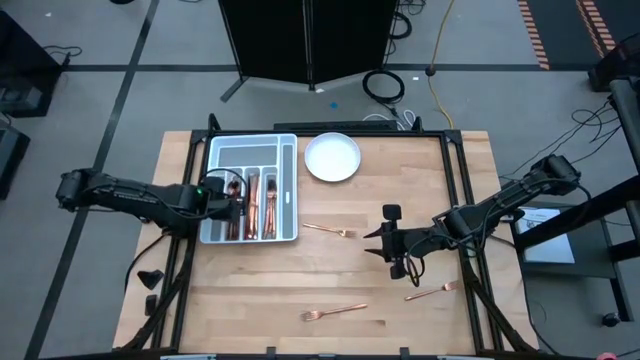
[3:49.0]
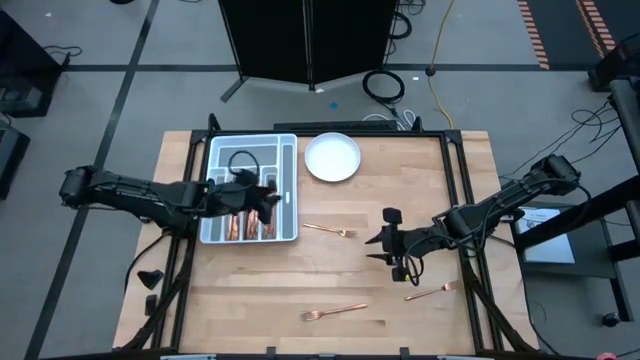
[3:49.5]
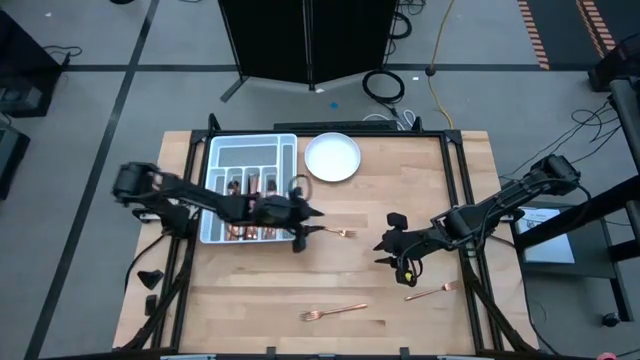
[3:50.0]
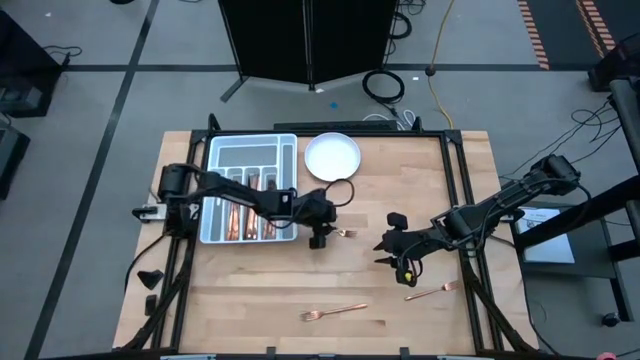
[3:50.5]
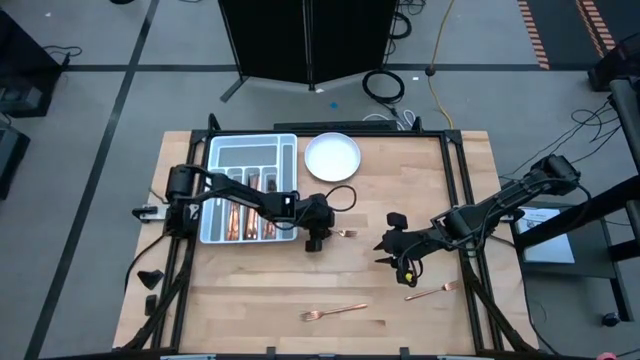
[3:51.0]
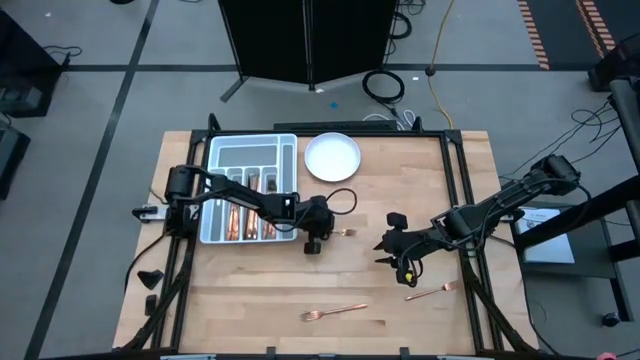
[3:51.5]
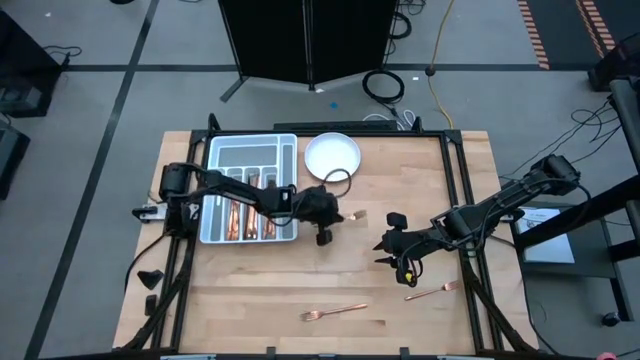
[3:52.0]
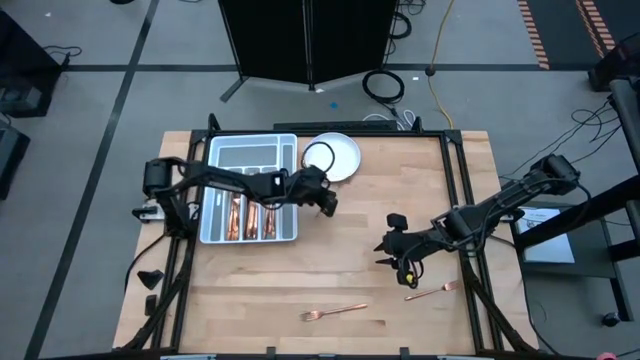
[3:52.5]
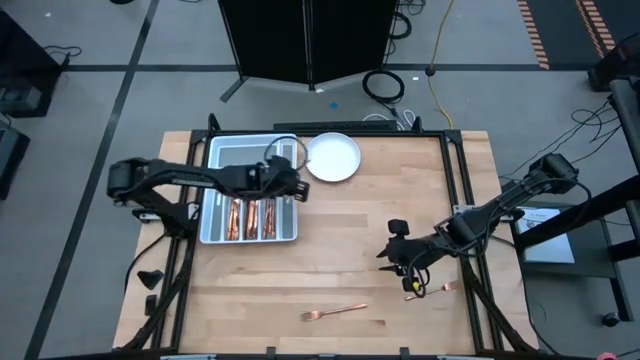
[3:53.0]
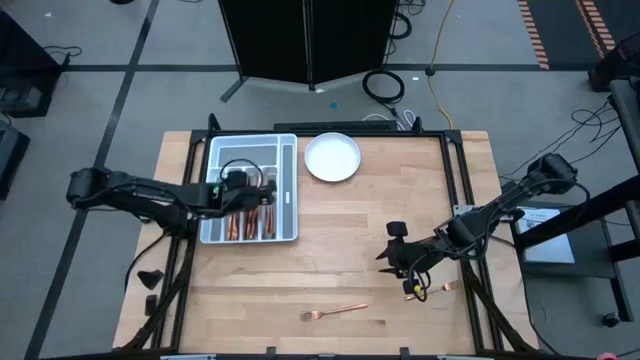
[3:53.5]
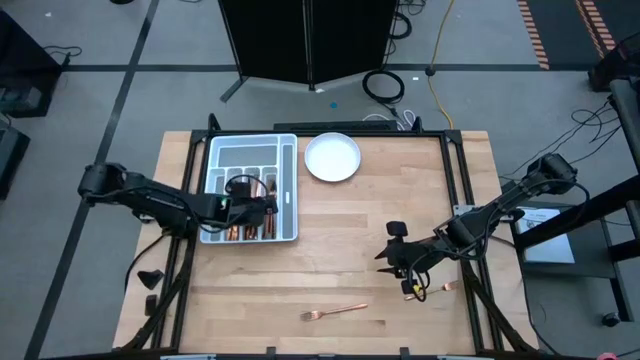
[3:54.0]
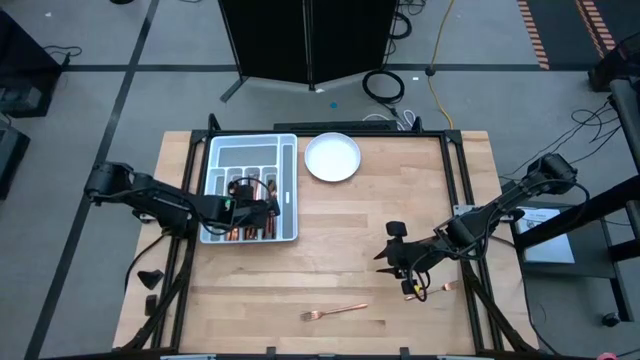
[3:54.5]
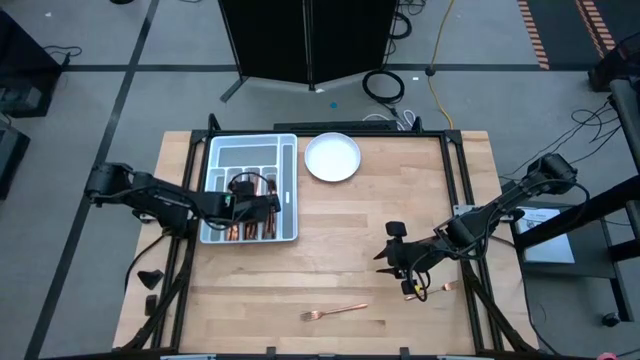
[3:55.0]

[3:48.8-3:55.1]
Task: Sort silverware
Put the fork on the silverware tray

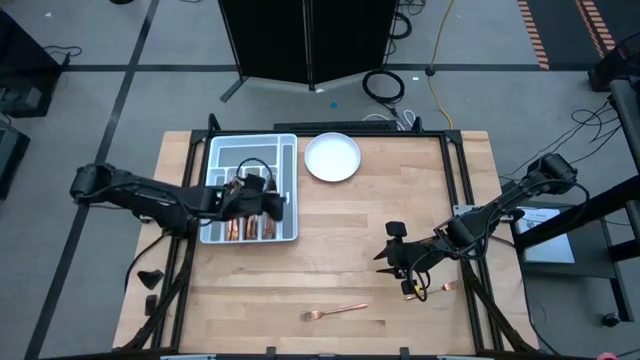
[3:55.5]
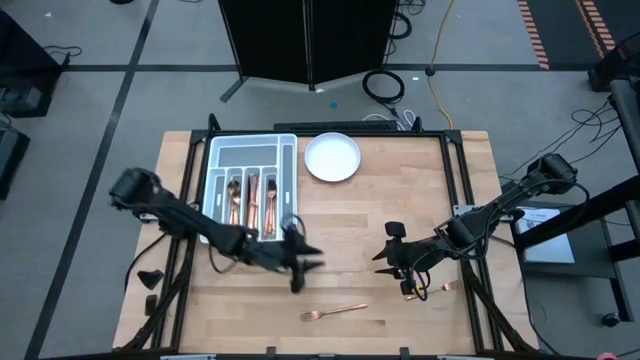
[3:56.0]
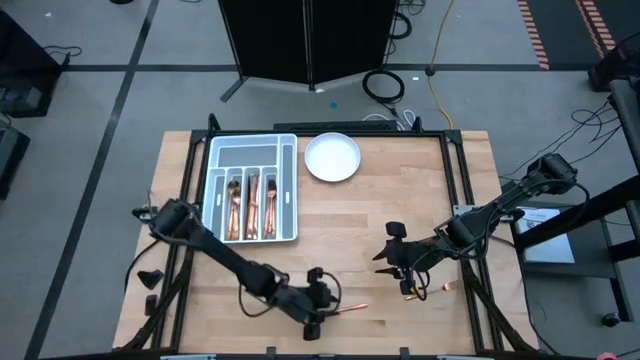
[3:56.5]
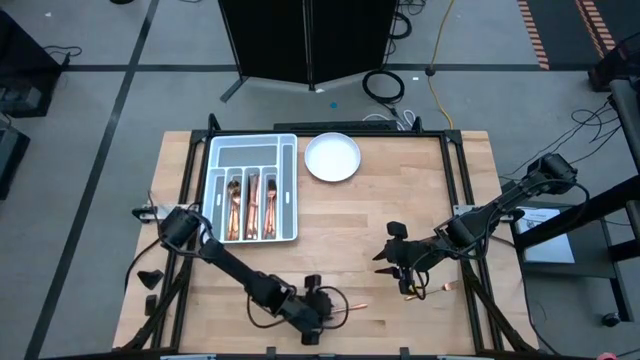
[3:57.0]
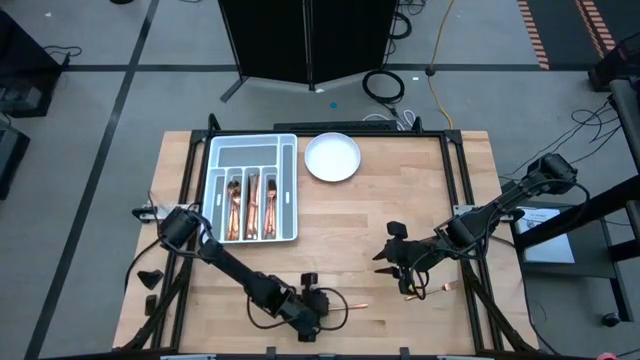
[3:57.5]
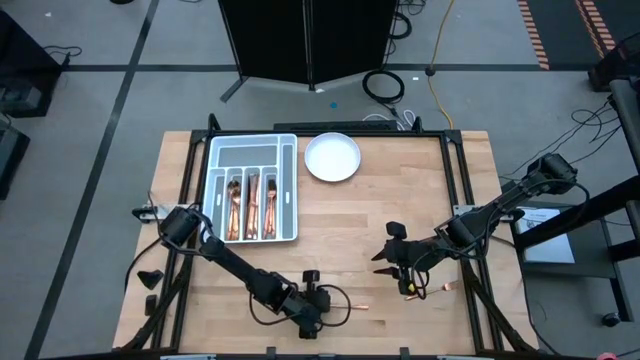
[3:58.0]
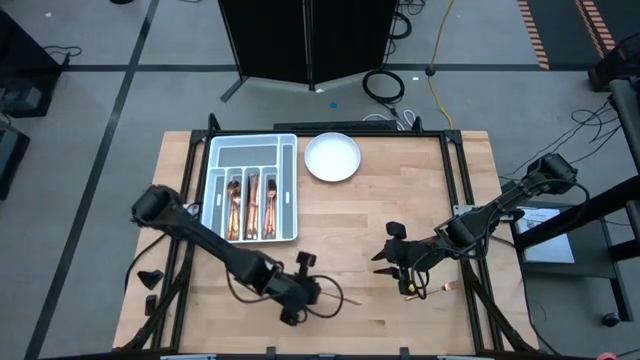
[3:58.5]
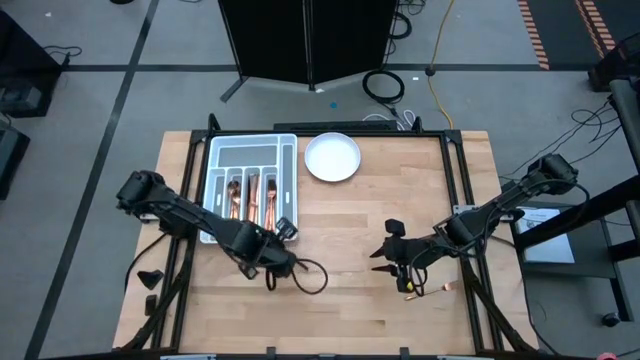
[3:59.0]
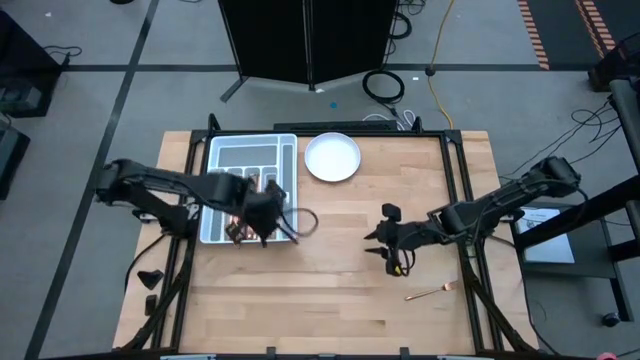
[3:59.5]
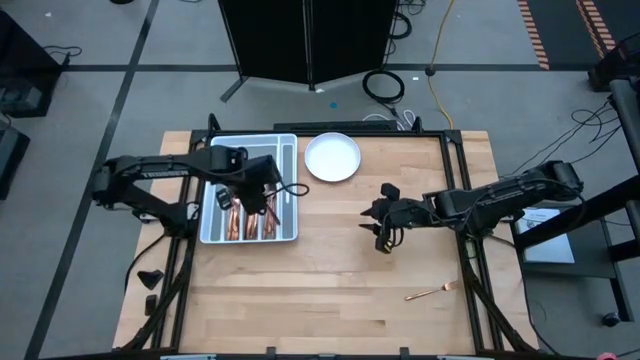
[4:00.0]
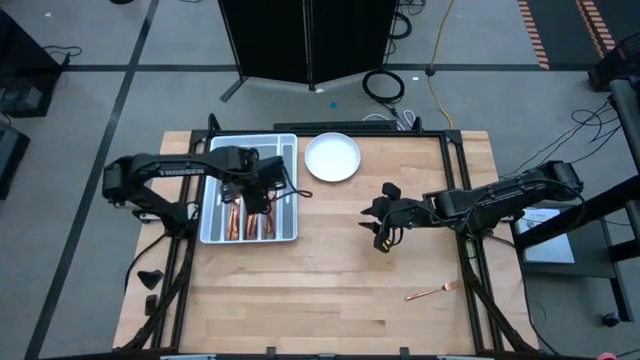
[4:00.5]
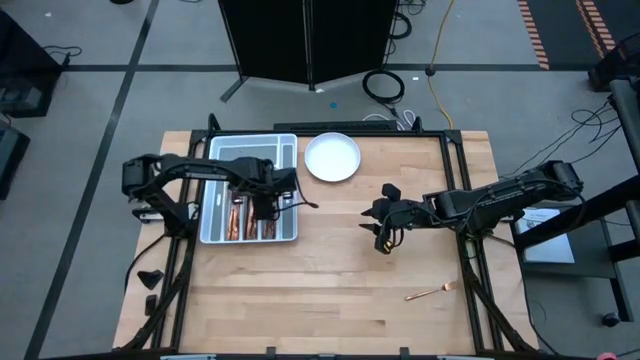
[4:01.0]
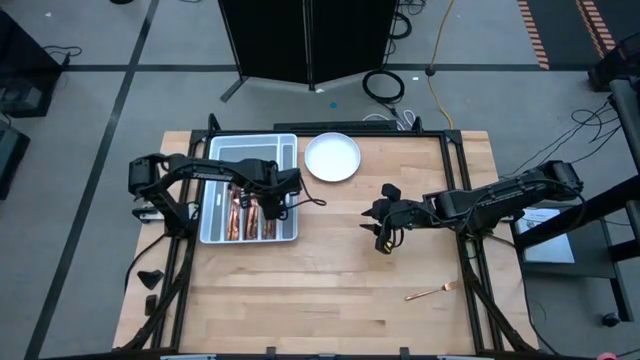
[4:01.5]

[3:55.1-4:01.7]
Put the fork on the silverware tray

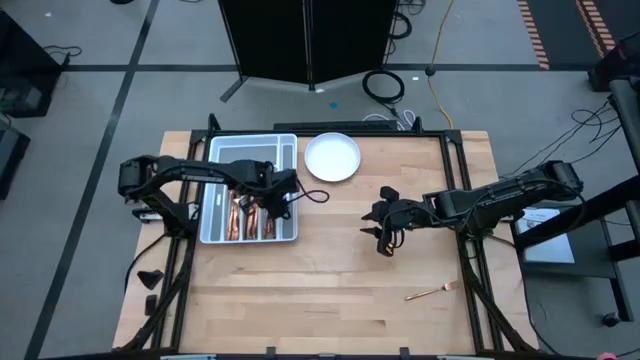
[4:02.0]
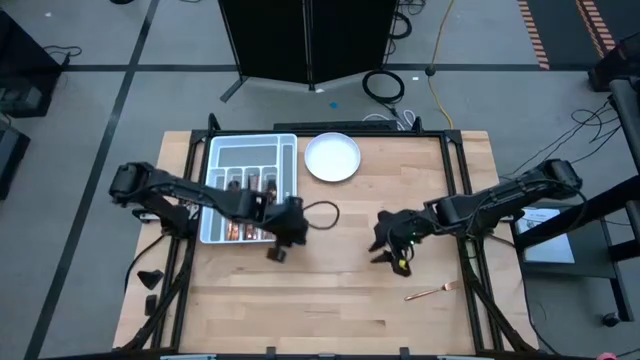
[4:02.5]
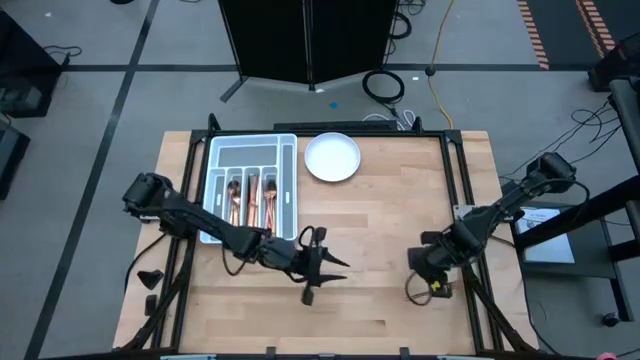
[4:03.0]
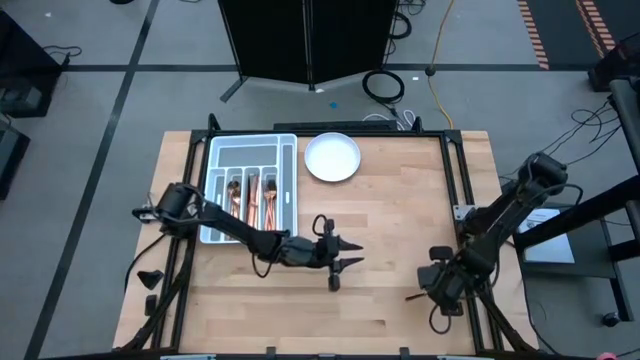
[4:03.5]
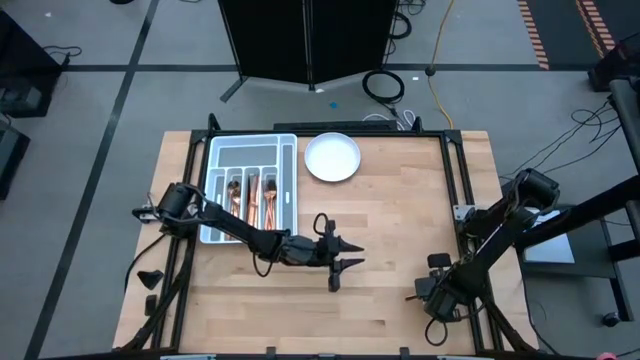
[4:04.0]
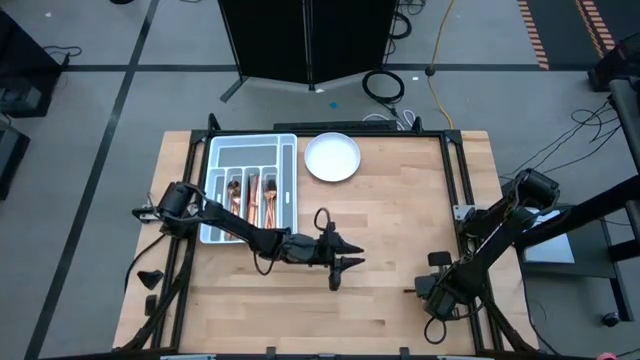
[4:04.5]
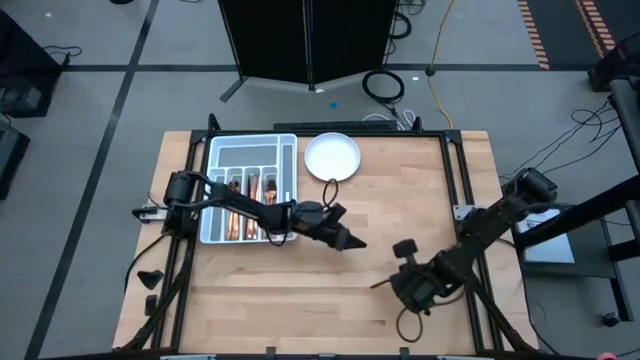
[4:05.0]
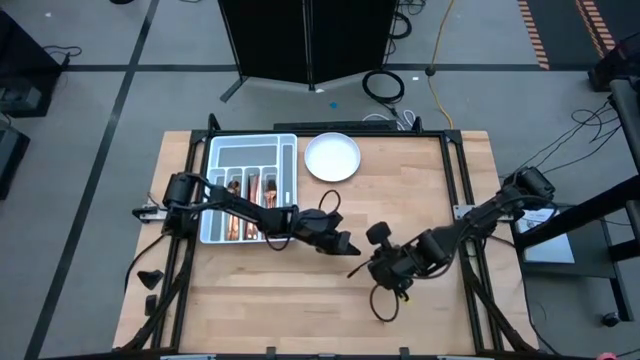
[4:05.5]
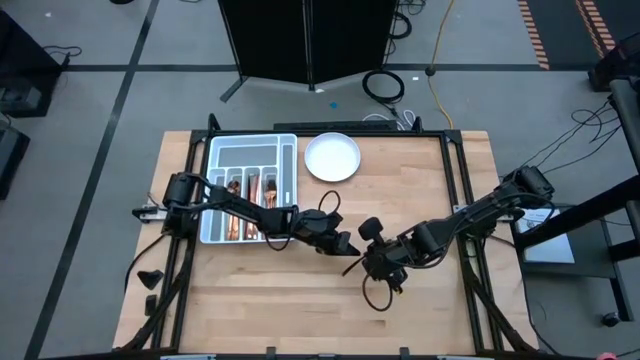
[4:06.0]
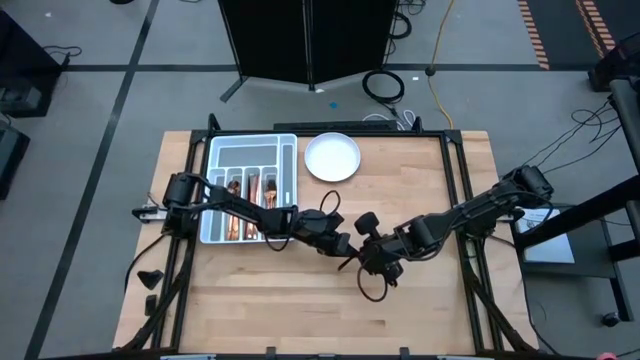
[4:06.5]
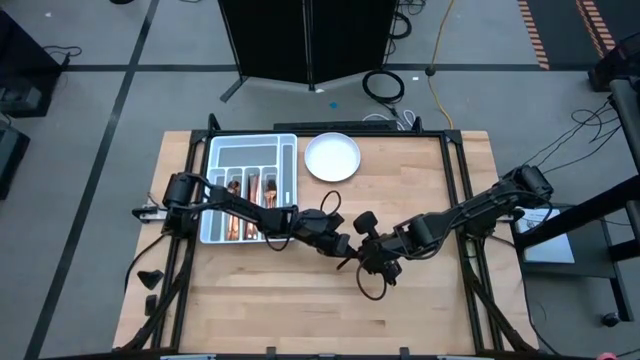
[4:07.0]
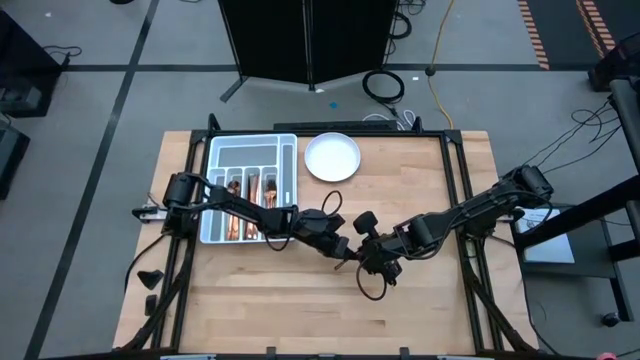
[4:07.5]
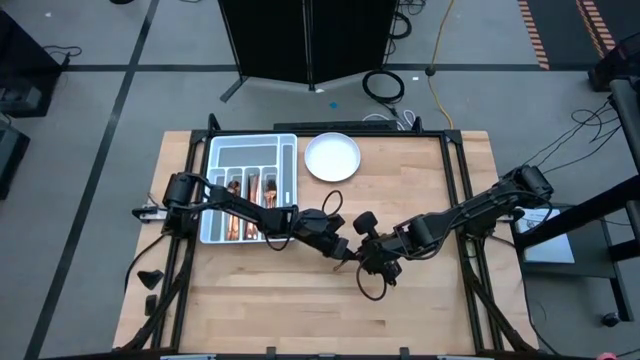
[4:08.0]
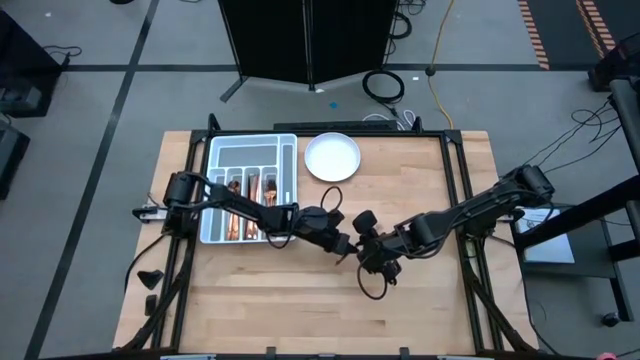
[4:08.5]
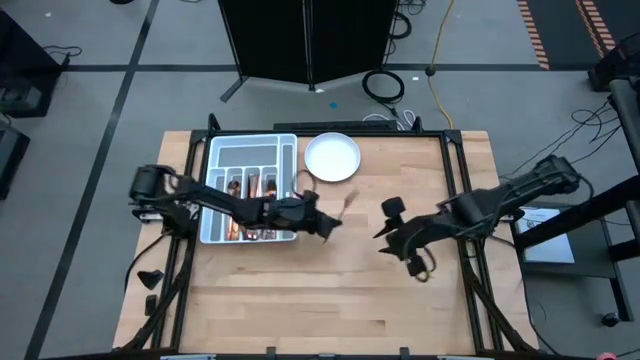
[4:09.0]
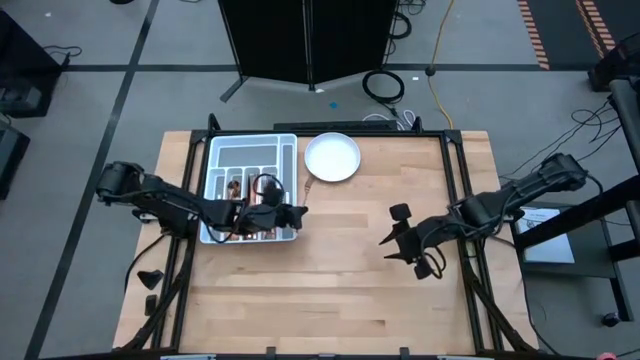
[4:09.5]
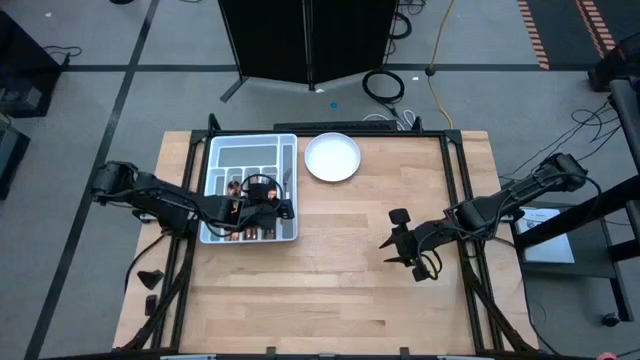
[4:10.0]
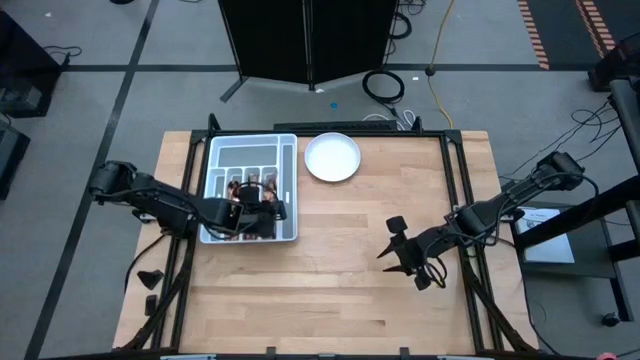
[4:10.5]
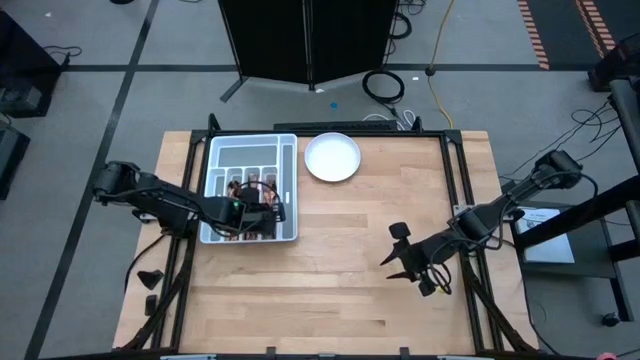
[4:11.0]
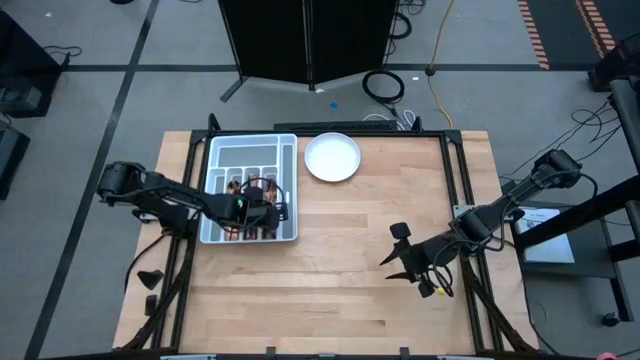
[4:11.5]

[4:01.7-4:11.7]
Put the fork on the silverware tray
